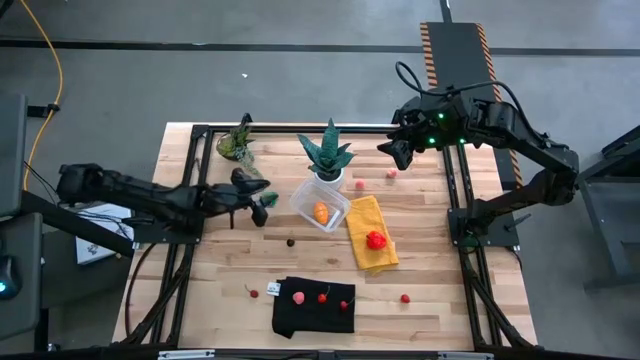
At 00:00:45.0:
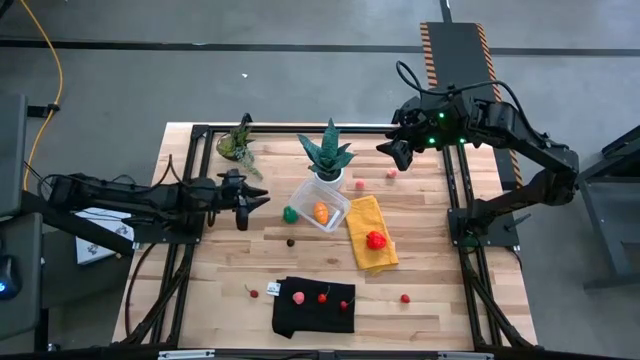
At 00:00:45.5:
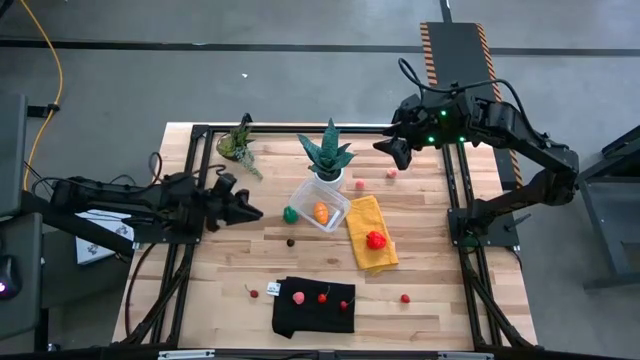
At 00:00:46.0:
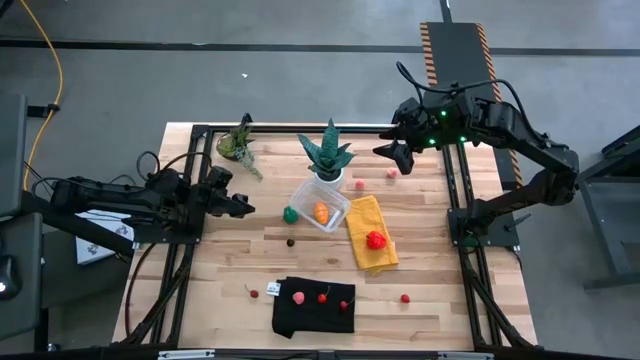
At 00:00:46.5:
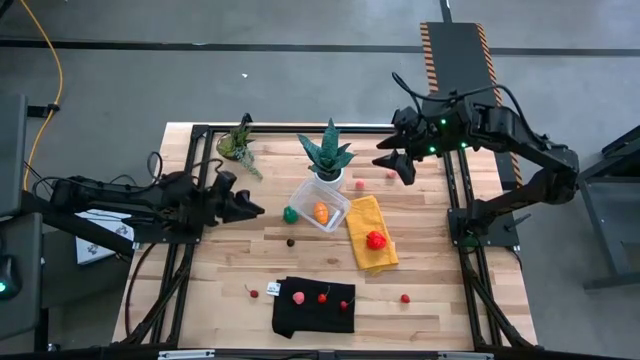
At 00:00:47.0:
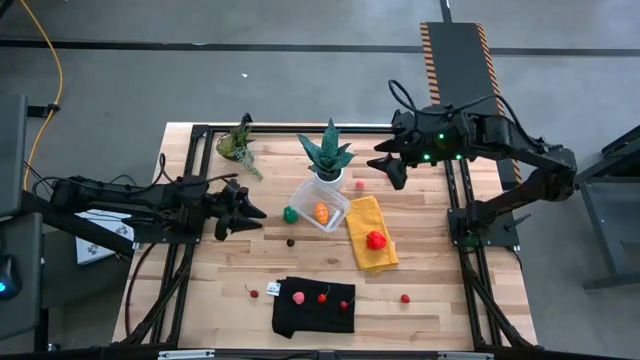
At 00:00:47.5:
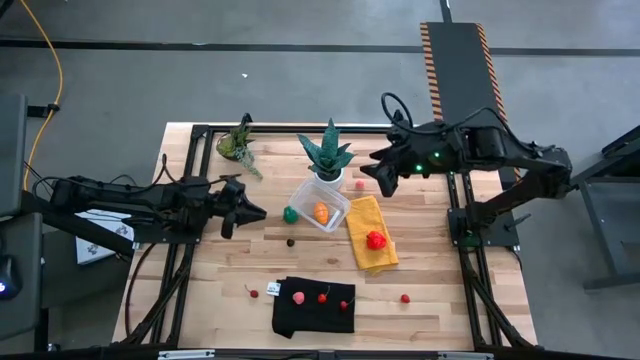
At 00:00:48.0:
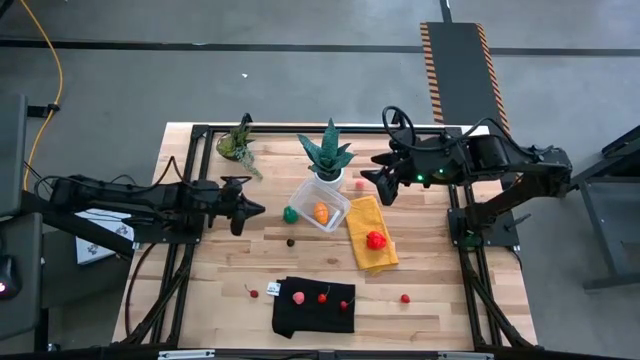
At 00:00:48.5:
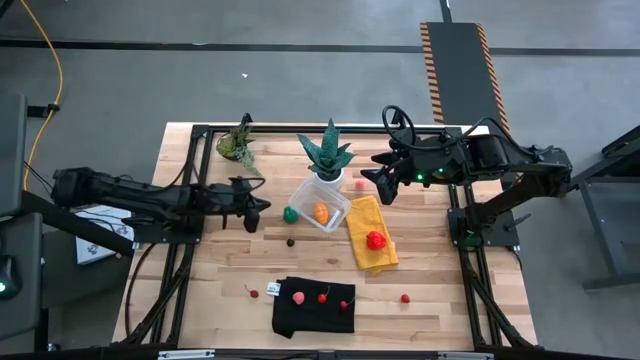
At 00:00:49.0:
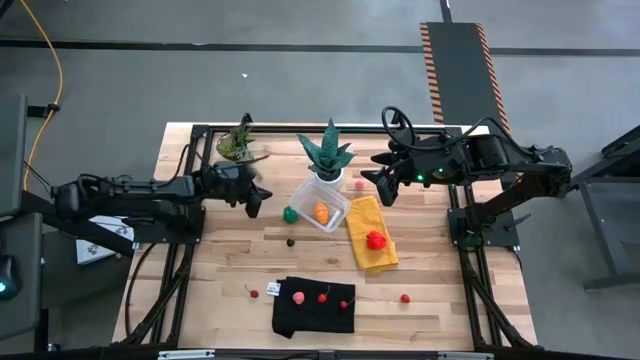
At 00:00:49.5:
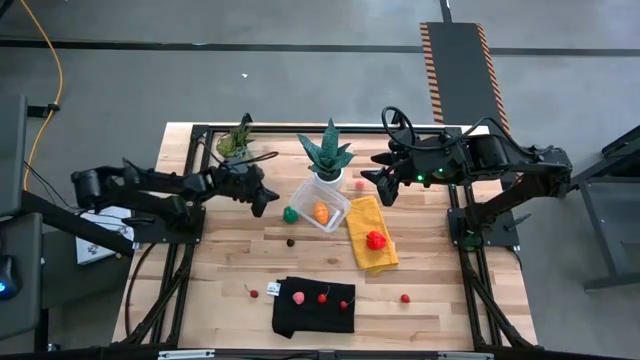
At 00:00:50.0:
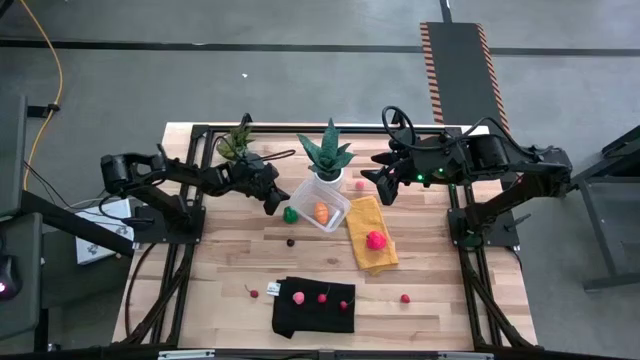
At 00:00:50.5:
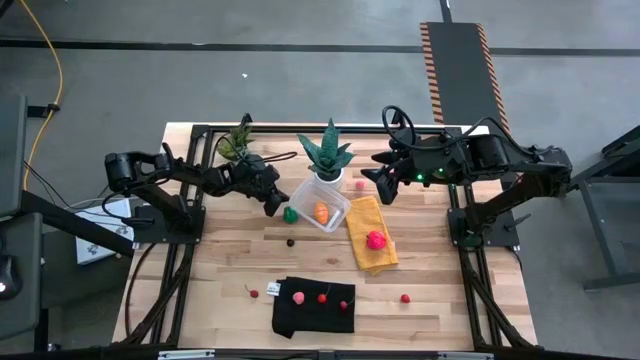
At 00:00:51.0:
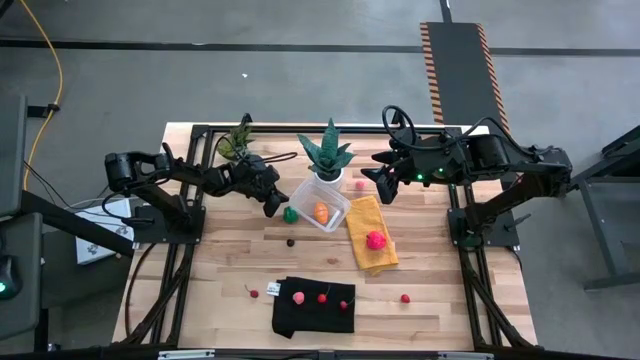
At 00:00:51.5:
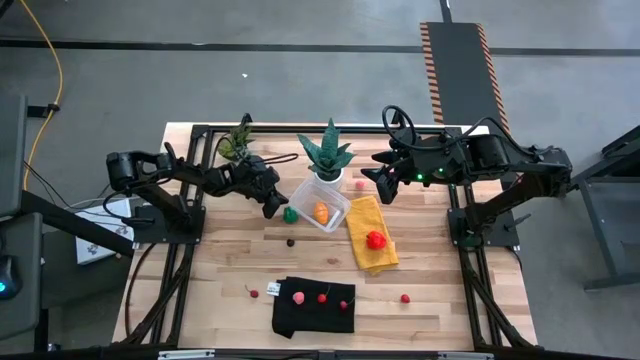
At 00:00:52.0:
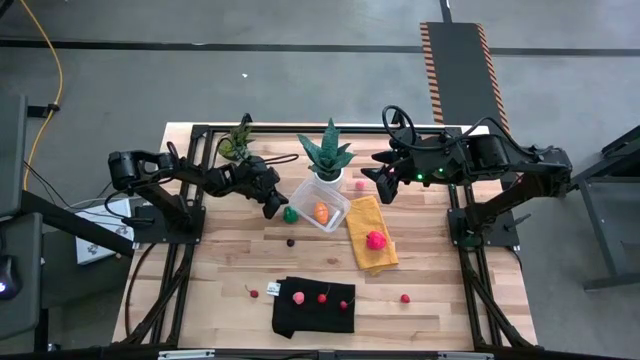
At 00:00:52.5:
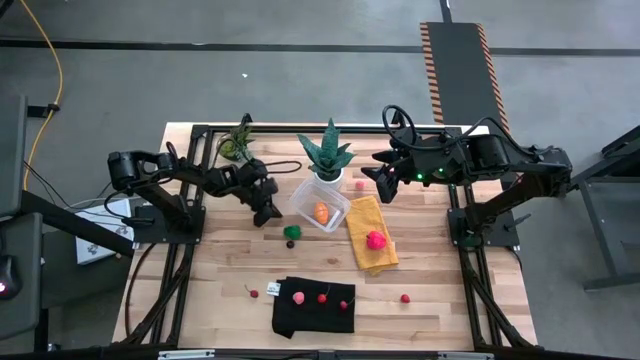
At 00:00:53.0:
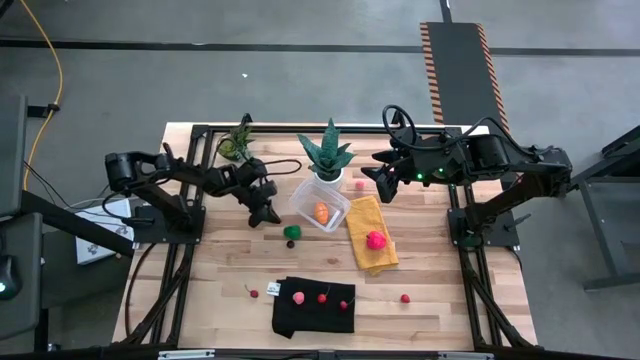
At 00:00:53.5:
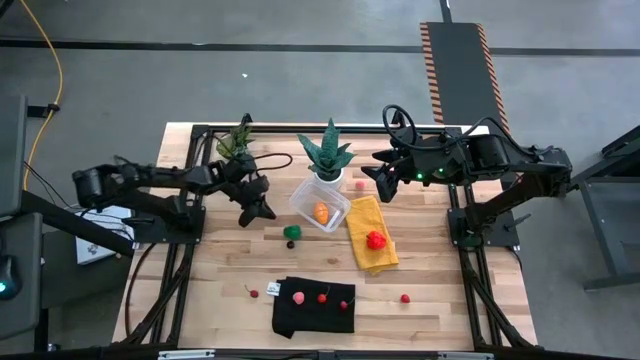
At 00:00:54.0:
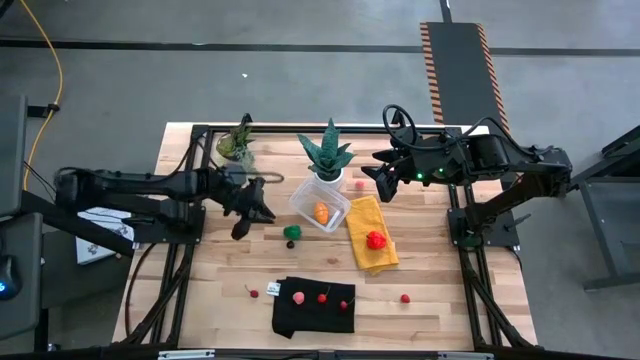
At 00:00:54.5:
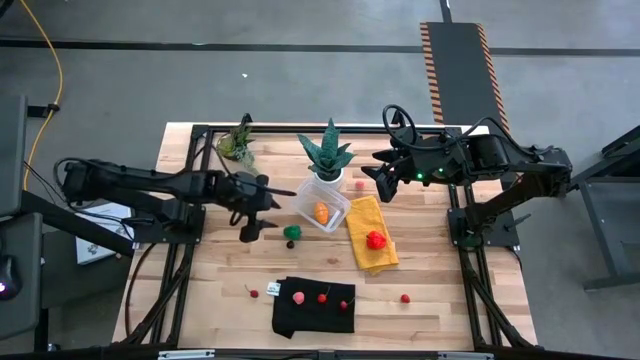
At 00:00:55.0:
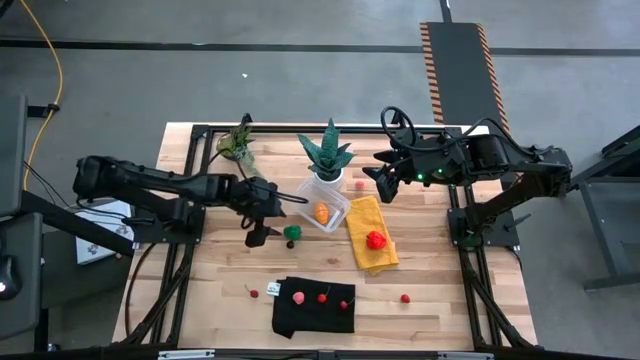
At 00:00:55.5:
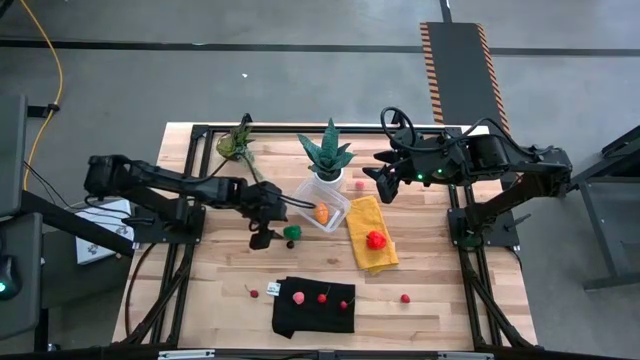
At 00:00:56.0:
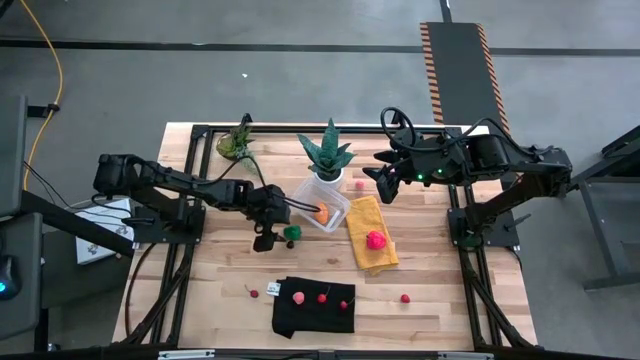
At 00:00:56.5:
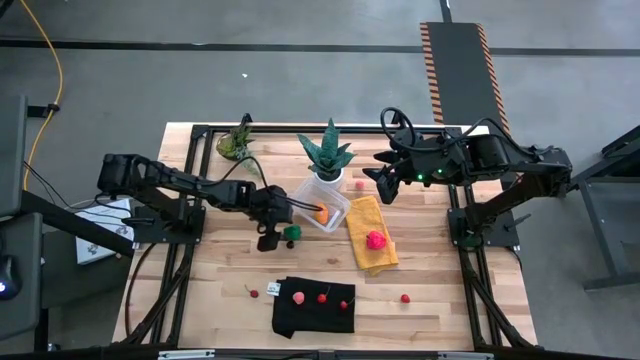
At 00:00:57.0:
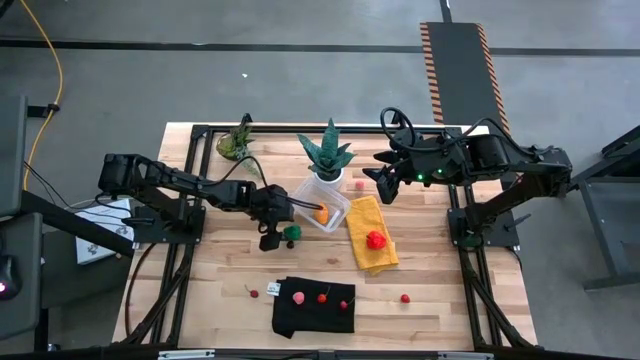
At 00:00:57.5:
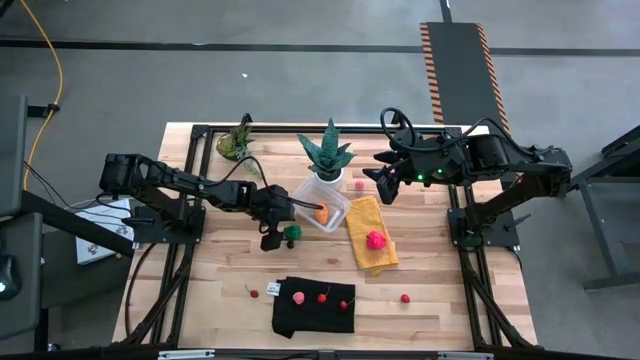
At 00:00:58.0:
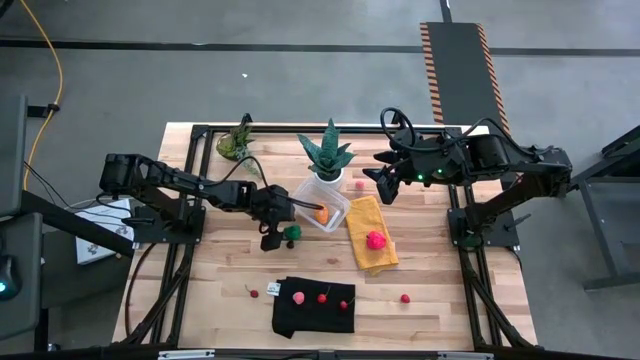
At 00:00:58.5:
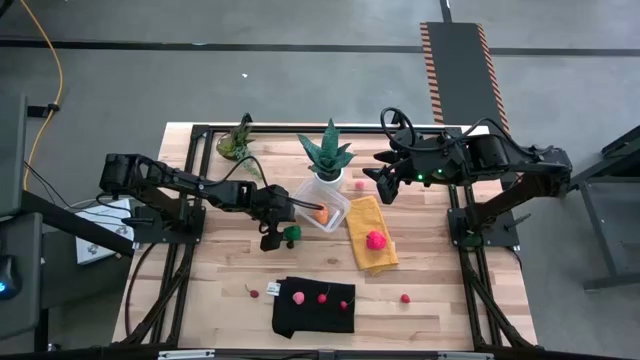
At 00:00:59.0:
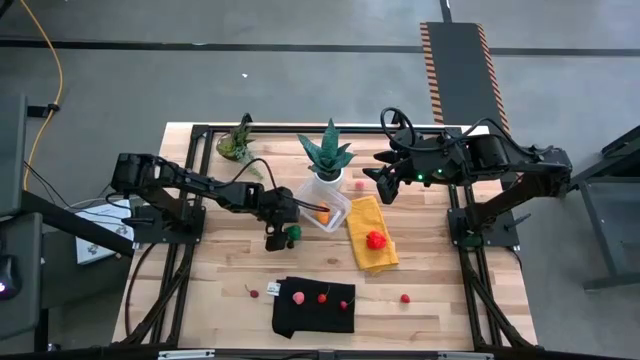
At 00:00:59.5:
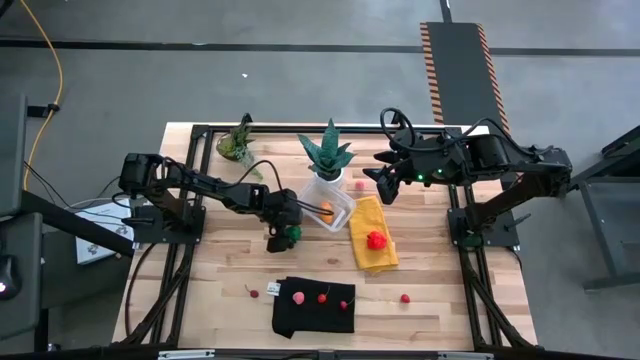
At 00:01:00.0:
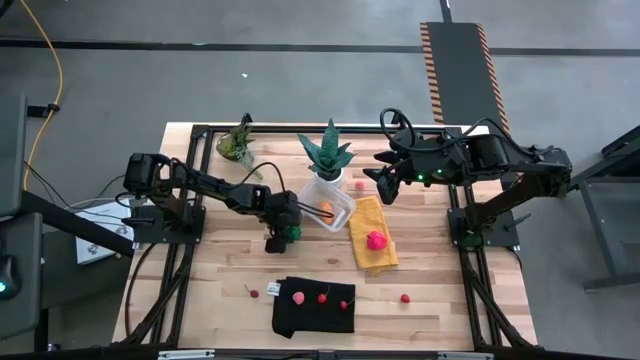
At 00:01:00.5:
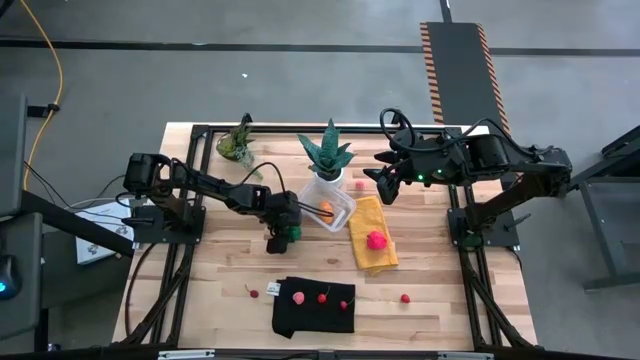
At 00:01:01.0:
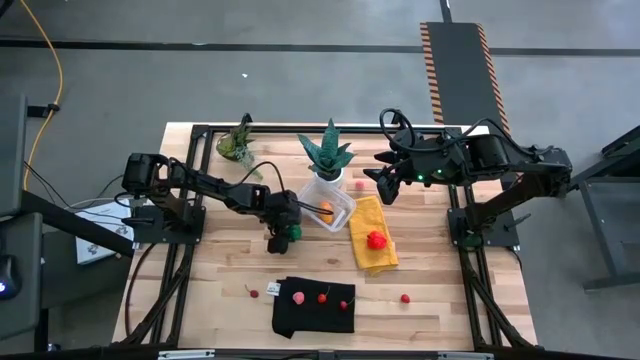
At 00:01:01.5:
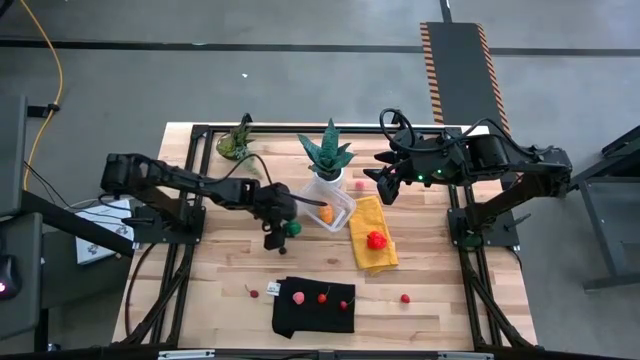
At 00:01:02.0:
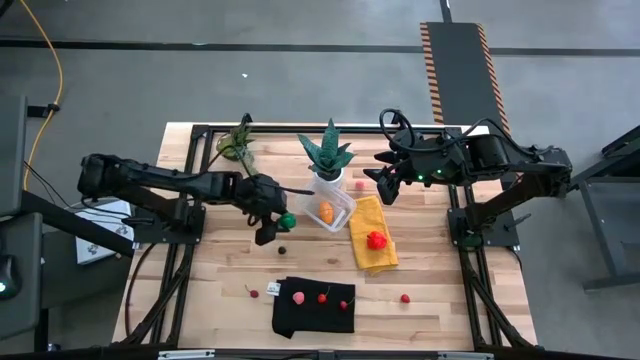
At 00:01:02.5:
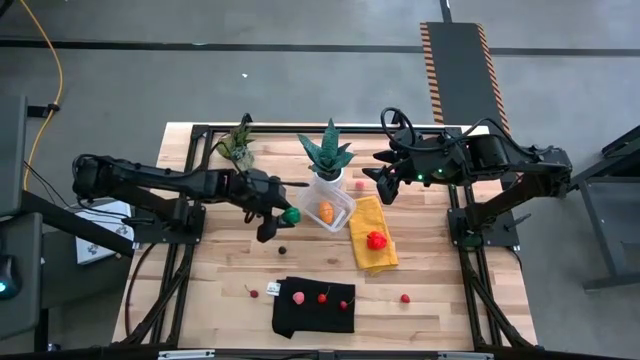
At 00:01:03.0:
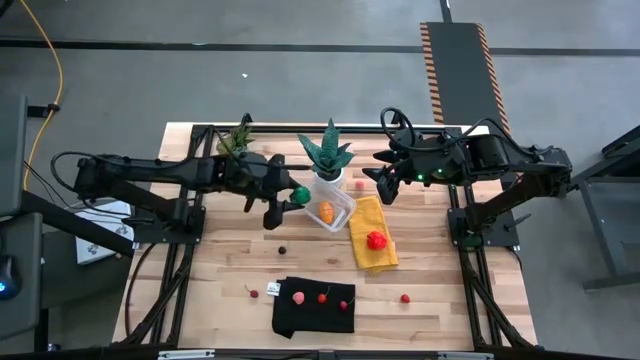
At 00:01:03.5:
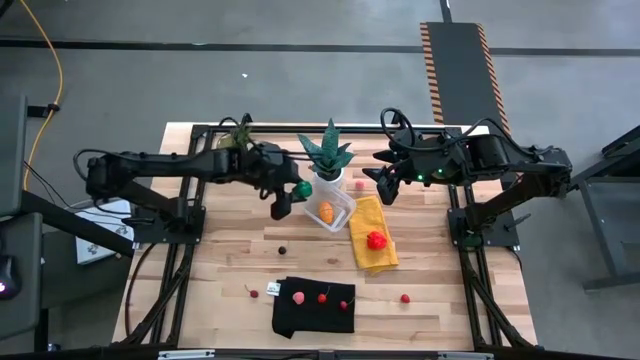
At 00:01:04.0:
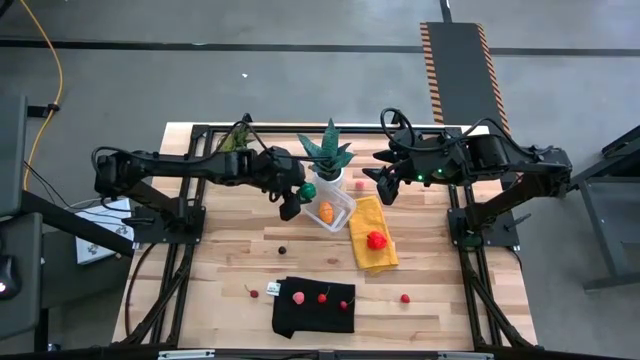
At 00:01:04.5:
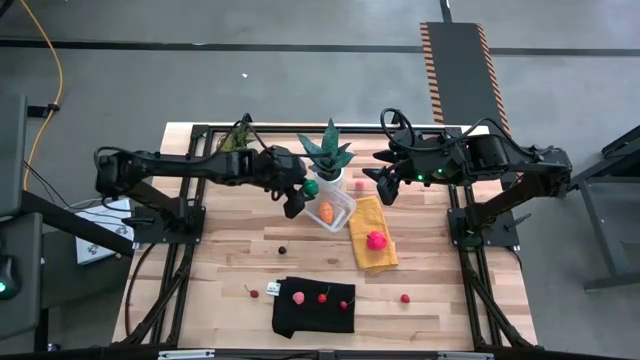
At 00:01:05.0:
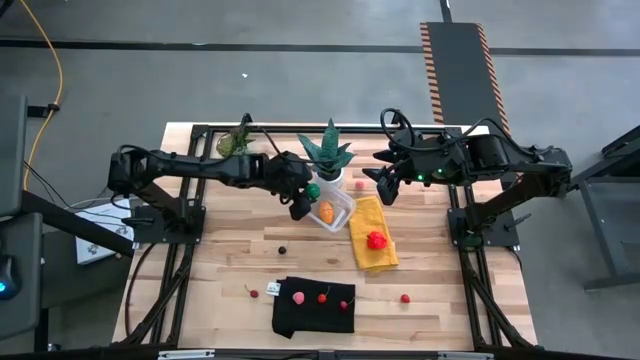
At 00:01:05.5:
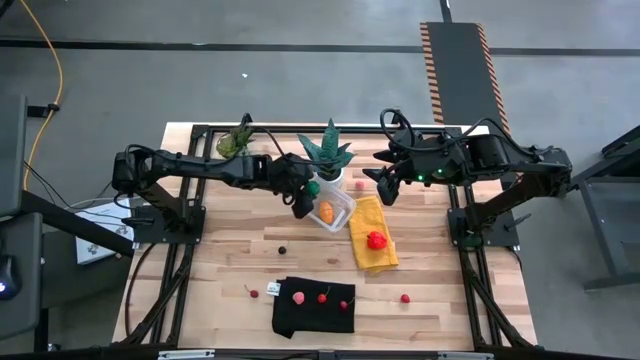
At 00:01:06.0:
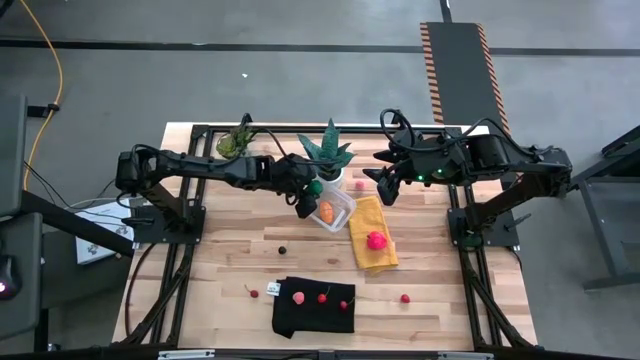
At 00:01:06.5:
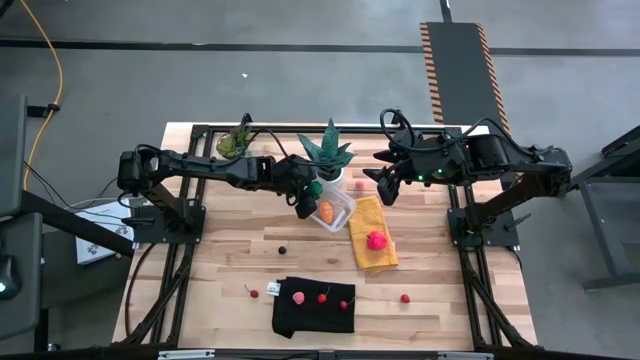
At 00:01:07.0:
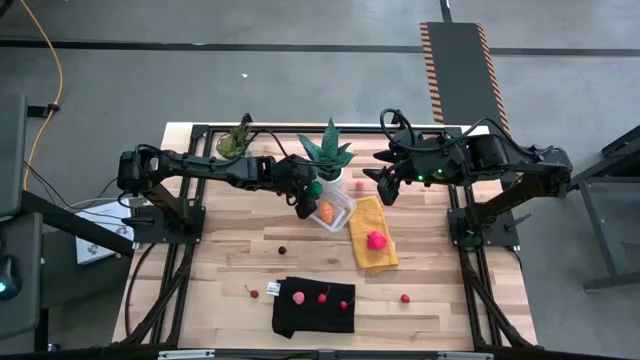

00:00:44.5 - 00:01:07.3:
Task: Pick and placing Produce into tupperware
Put the green bell pepper into the transparent container
